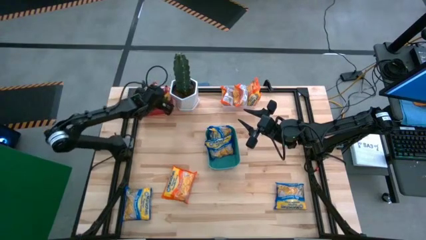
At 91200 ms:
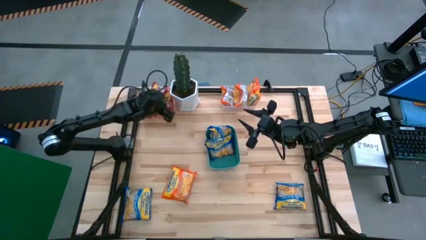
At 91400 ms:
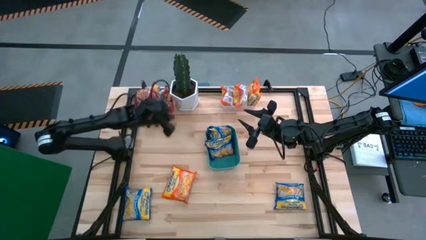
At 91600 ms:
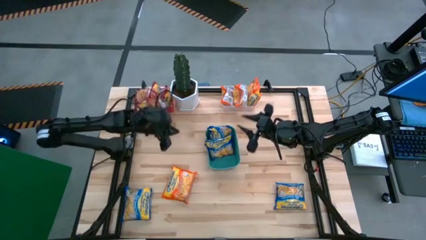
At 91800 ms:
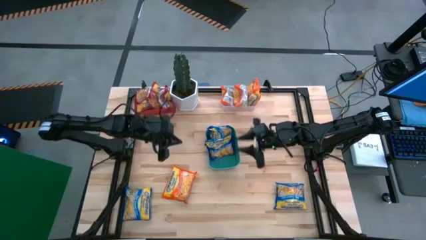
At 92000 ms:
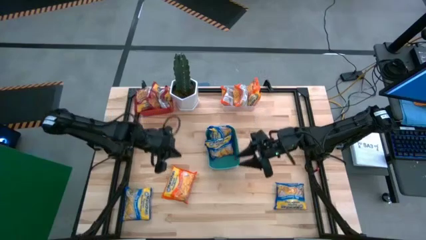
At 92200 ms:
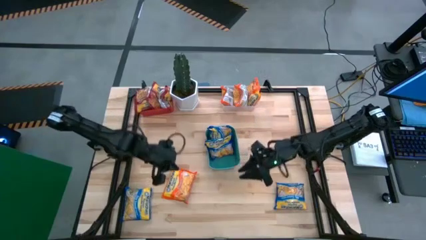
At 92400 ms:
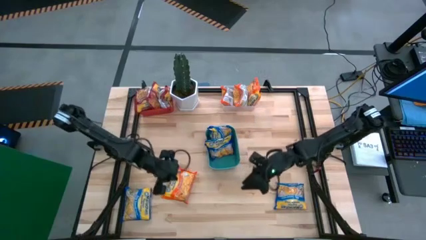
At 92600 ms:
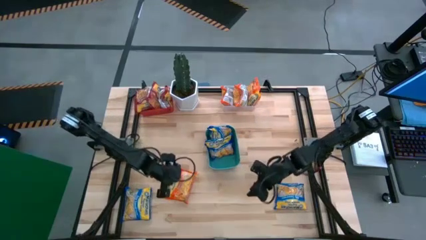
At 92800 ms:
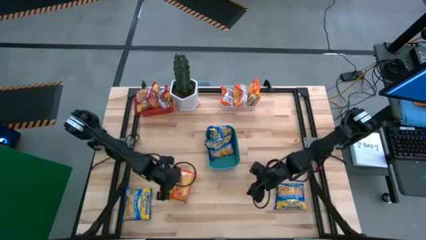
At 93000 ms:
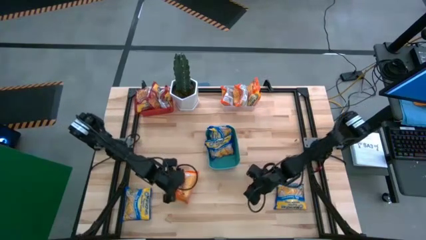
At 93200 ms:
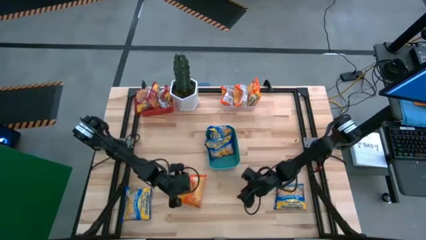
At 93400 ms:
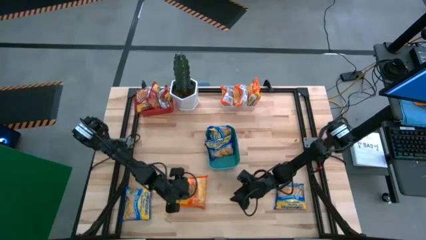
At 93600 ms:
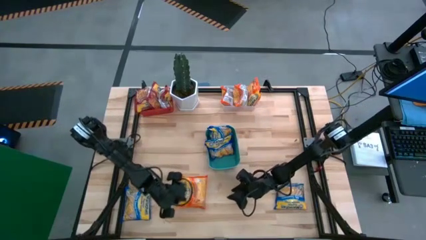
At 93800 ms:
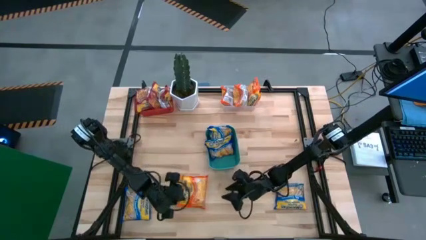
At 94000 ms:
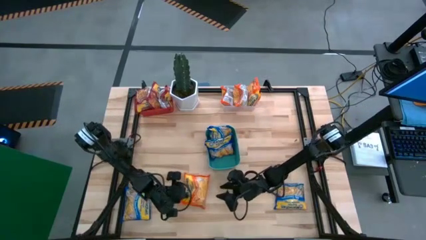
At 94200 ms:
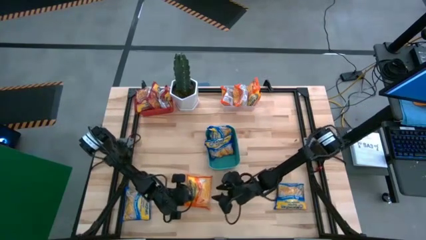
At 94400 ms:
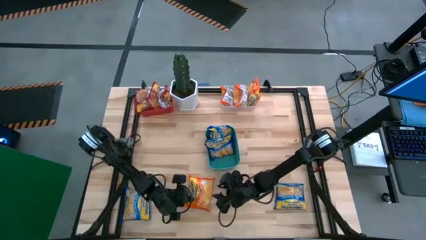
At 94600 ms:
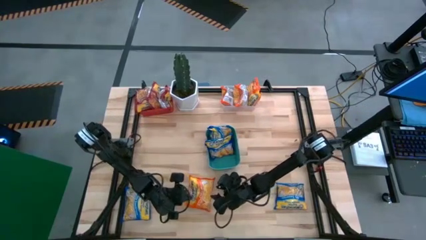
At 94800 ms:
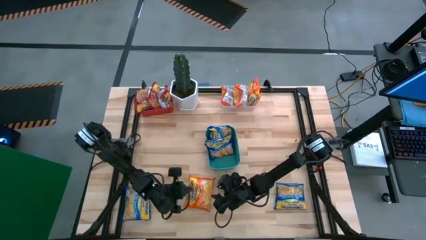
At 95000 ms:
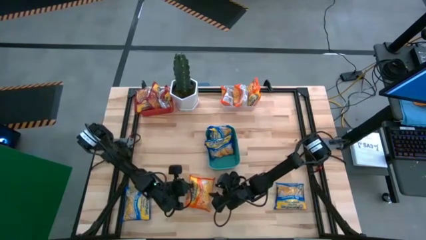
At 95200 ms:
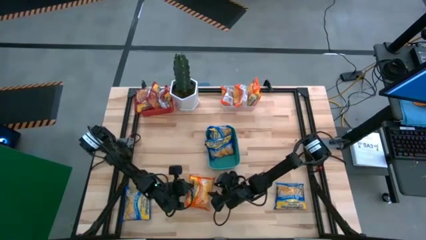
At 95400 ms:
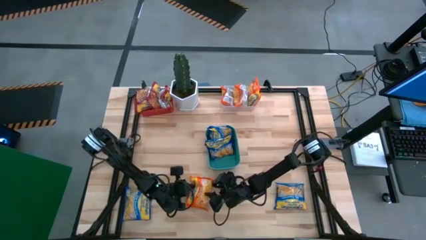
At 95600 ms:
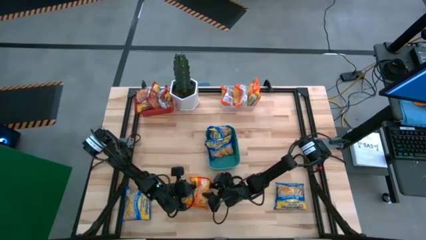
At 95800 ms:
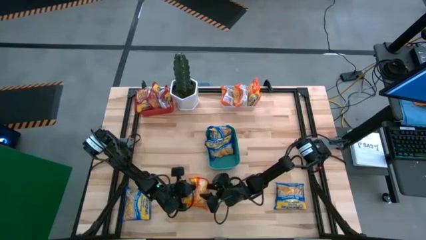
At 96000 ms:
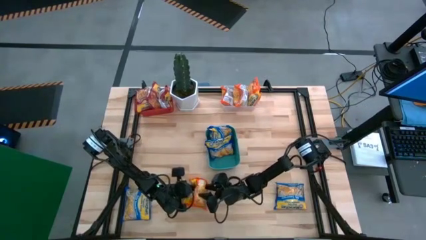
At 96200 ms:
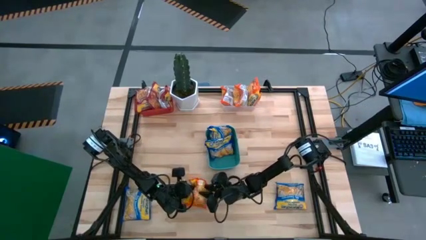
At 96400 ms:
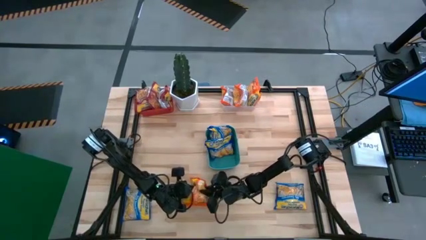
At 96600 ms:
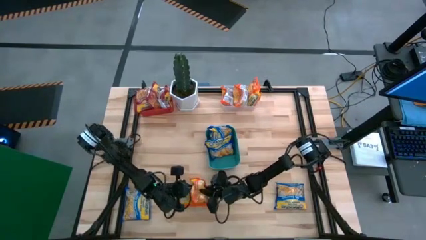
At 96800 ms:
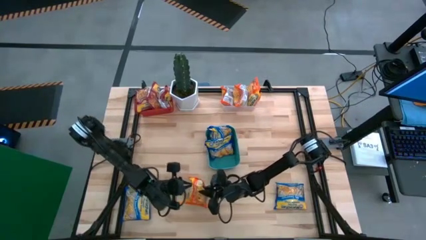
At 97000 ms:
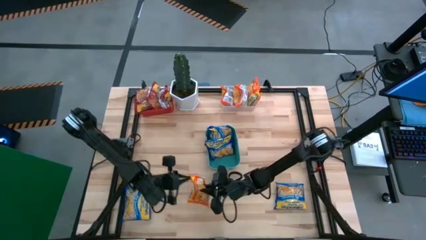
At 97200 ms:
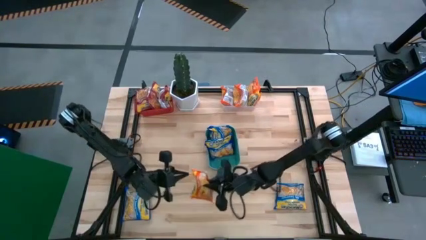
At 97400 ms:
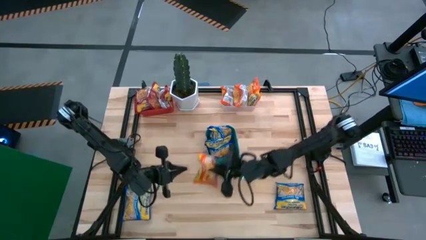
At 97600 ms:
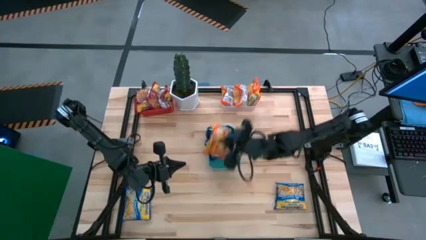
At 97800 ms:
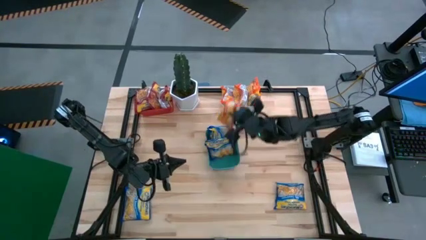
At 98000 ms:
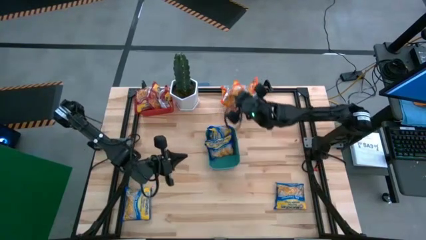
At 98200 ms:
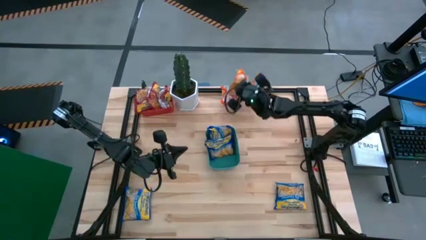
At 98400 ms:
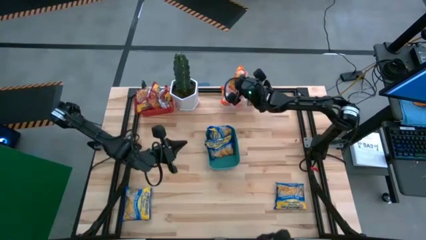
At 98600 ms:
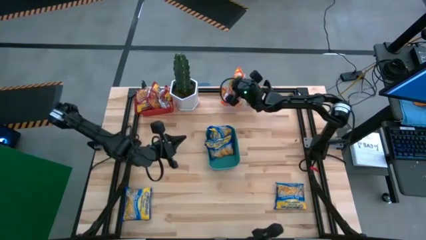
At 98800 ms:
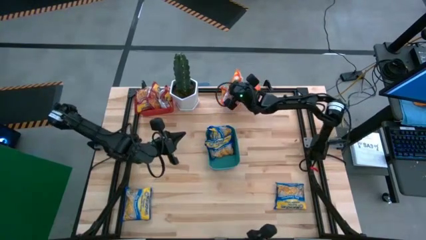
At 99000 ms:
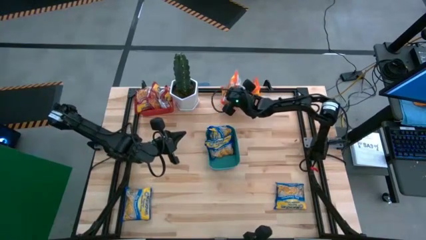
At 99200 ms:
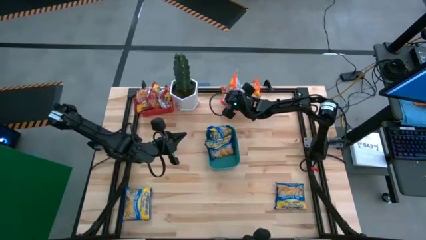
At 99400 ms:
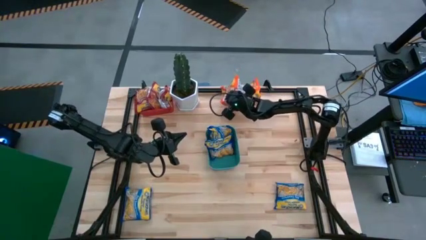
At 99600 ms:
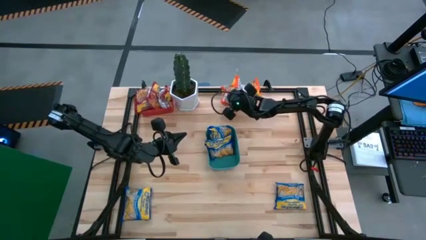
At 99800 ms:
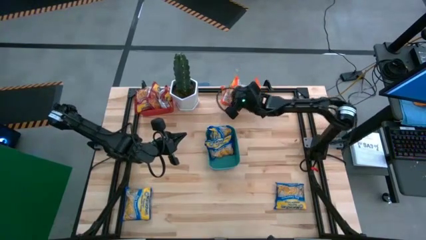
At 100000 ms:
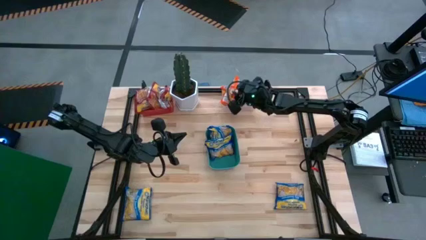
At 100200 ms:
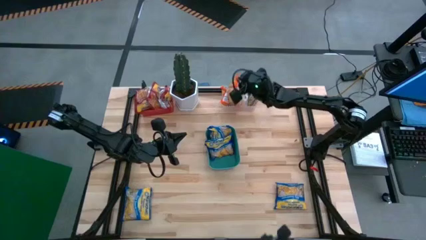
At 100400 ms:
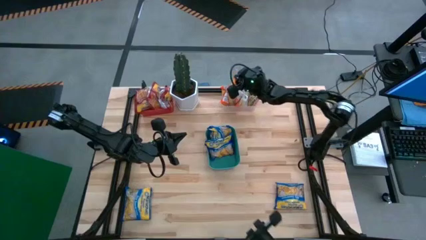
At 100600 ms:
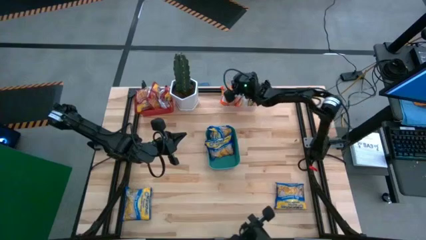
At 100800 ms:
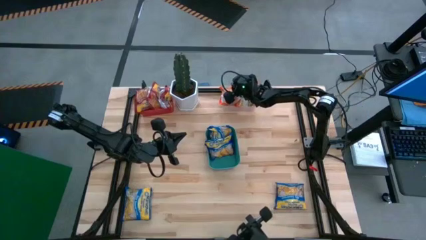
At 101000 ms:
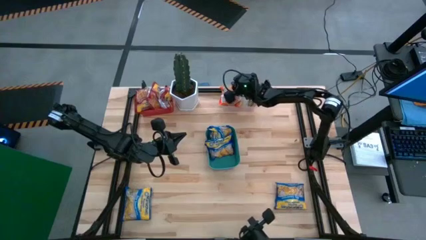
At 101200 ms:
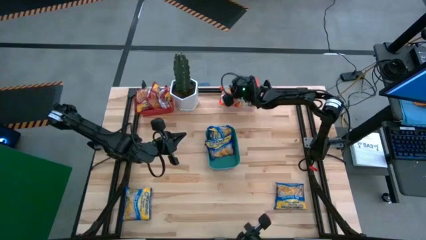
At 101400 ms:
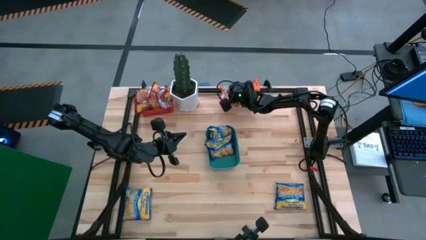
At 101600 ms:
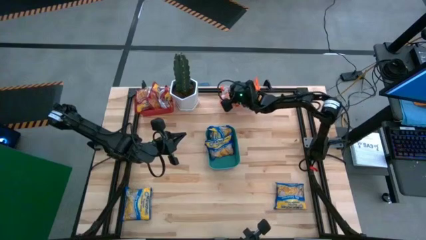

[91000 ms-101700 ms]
Task: Sort Maruchan noodles
Put the orange noodle pack into the transparent bin

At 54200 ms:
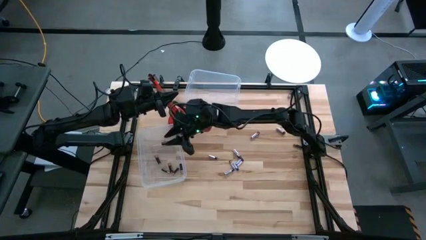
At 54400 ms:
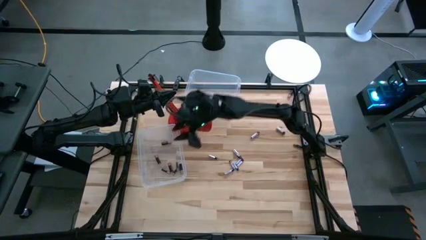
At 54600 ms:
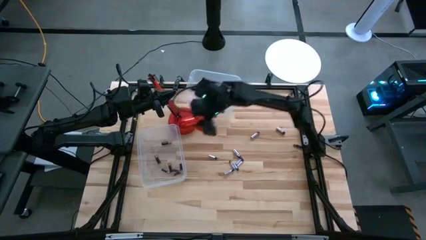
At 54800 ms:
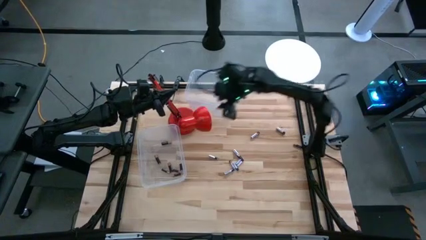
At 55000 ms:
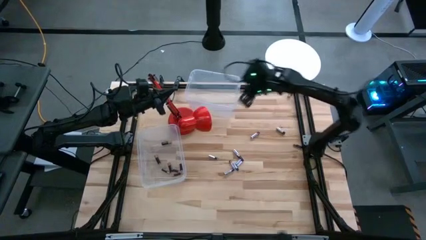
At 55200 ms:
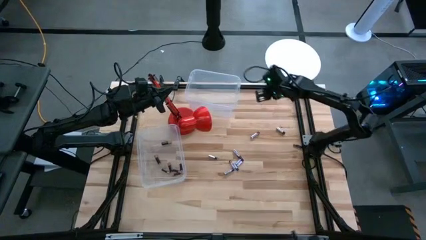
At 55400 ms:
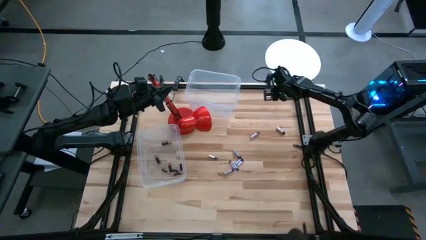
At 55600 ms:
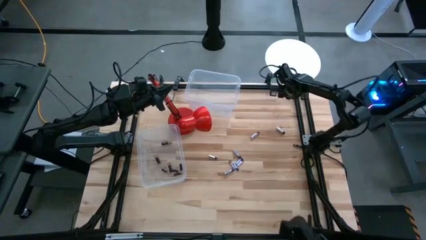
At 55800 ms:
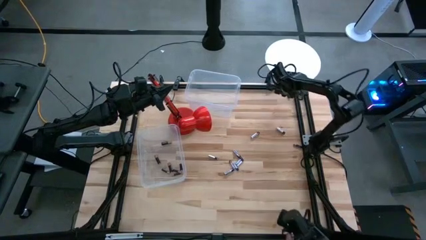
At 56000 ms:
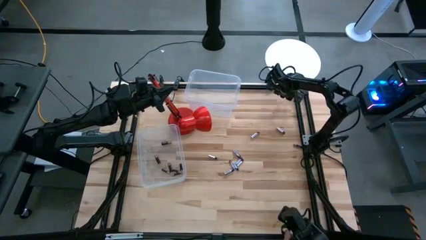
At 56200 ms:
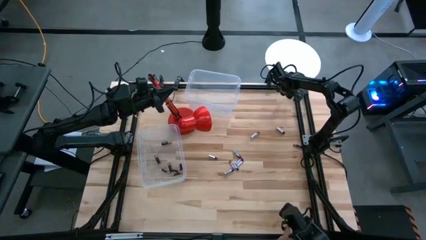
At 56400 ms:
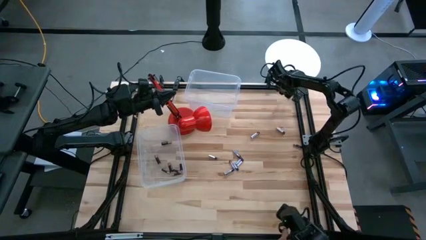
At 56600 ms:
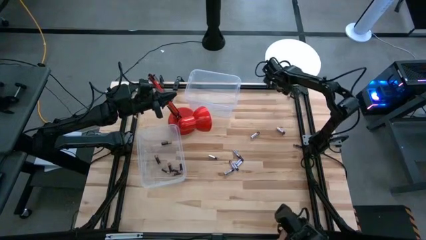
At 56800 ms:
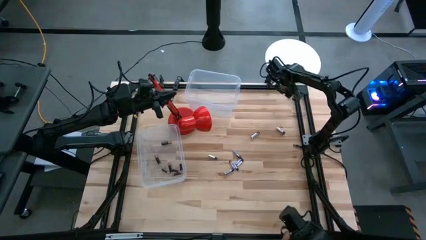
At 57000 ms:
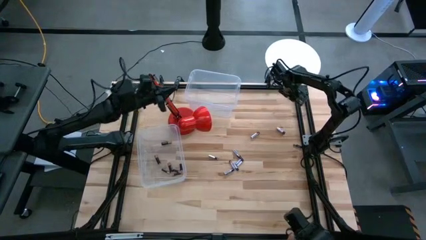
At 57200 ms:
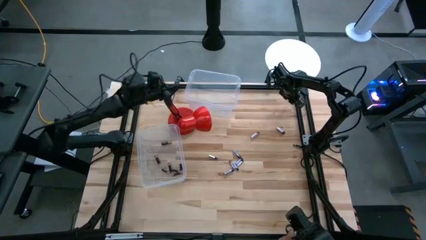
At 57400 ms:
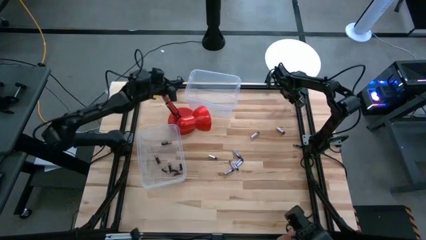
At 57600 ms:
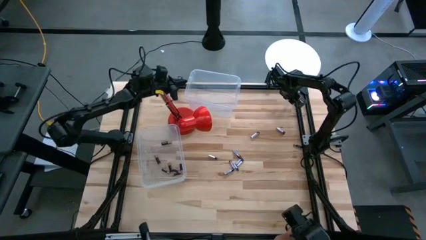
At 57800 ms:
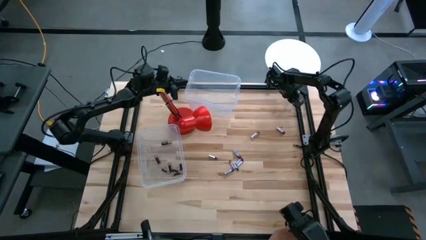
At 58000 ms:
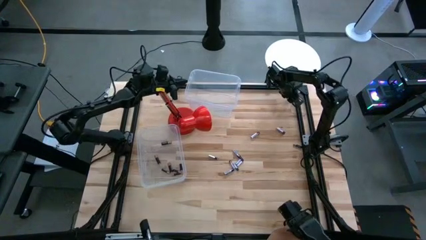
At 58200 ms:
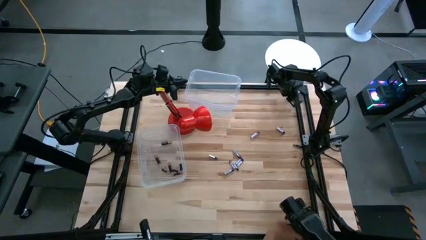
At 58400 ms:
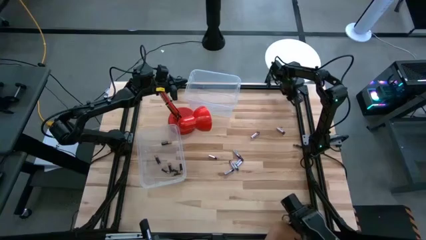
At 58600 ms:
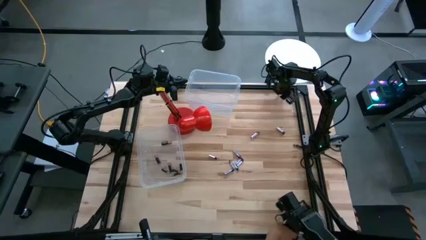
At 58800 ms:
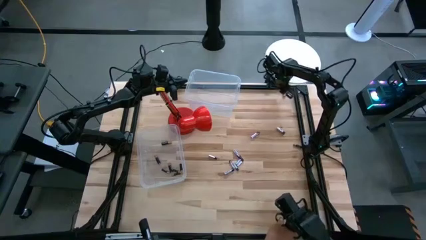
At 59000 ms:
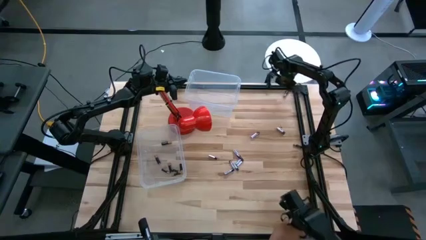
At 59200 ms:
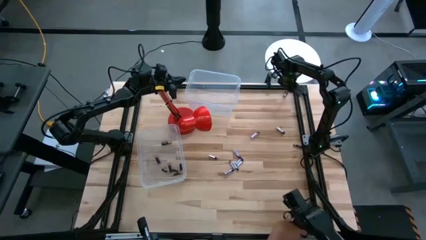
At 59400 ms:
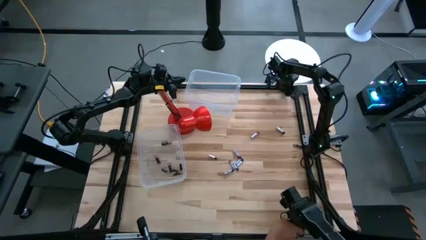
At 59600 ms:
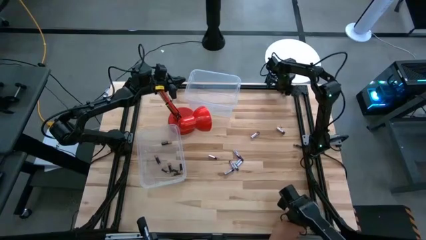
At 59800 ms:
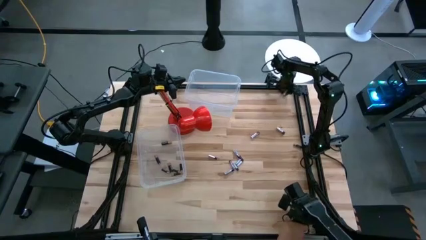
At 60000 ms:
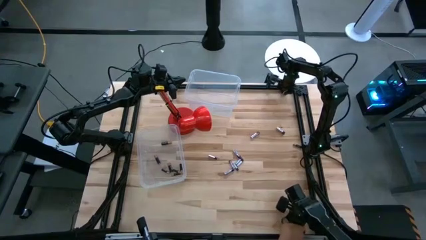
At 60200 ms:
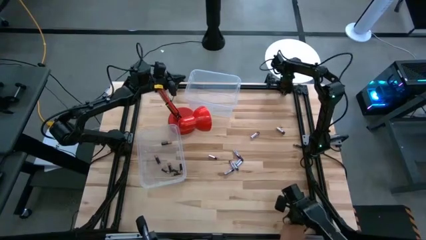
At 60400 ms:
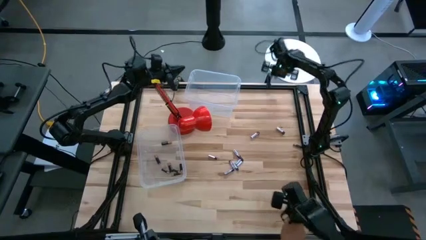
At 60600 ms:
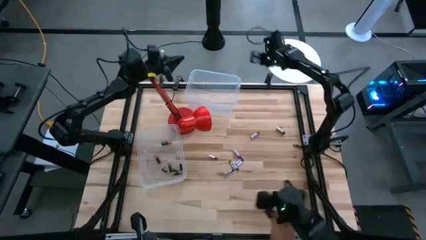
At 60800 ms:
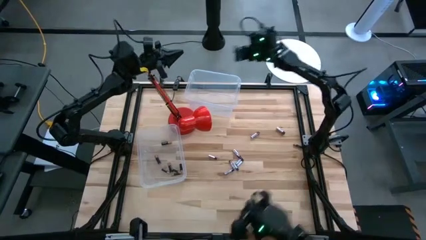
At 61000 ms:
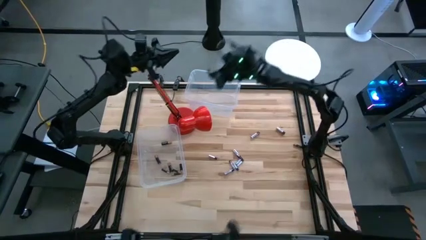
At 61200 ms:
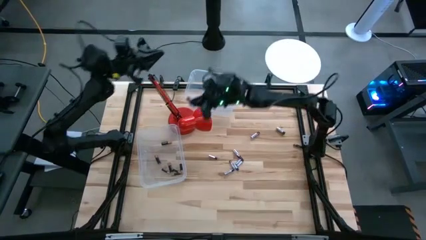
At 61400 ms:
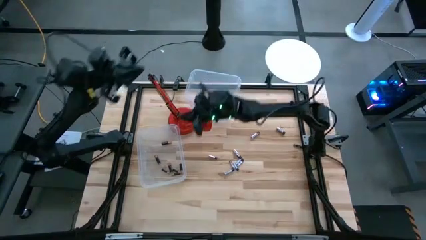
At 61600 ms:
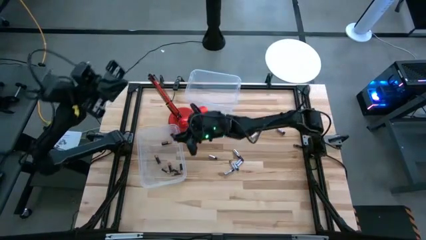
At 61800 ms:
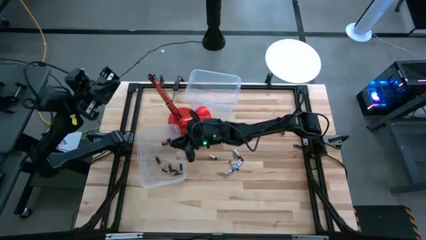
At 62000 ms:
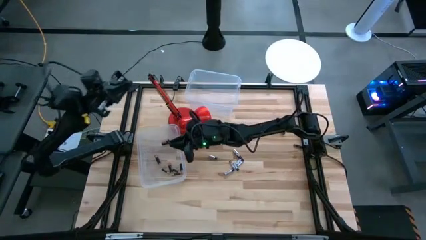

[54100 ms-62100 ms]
Task: Sort batteries
Put the black battery into the bottom transparent bin
